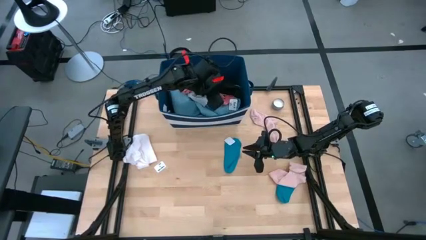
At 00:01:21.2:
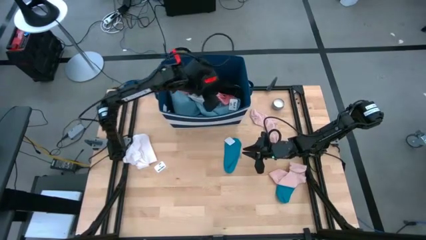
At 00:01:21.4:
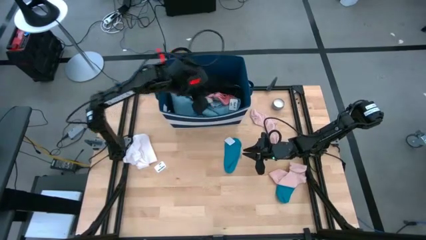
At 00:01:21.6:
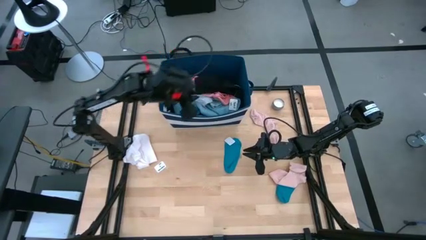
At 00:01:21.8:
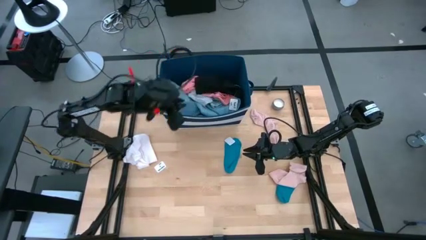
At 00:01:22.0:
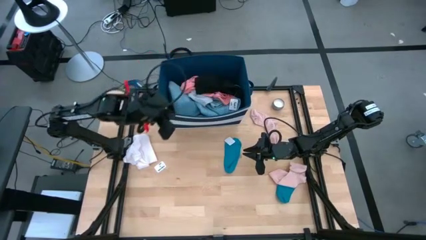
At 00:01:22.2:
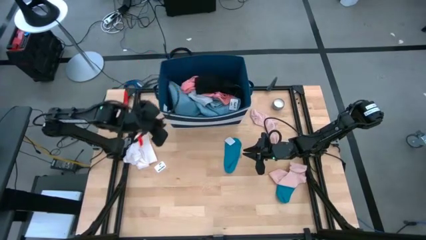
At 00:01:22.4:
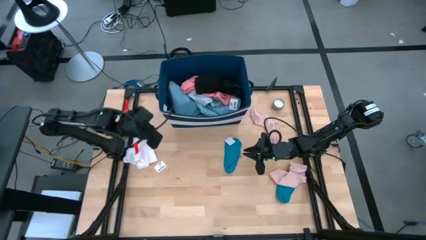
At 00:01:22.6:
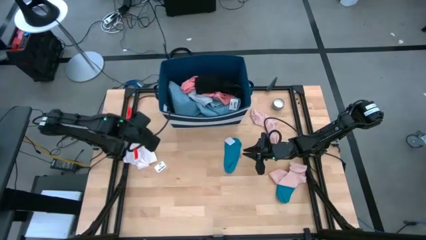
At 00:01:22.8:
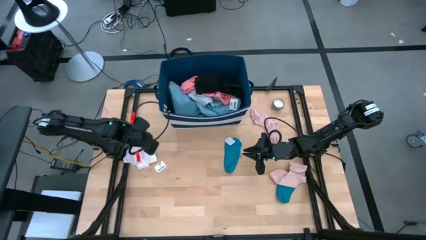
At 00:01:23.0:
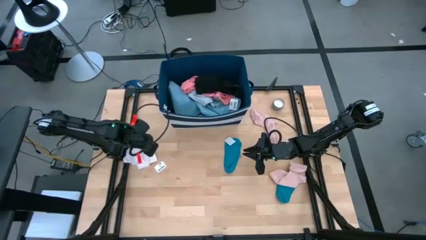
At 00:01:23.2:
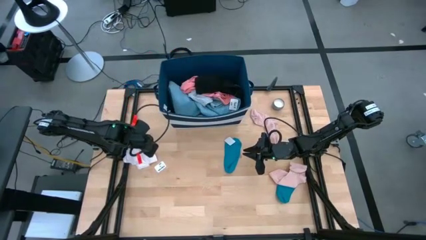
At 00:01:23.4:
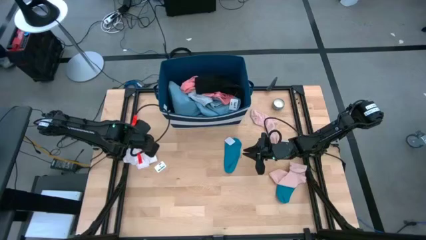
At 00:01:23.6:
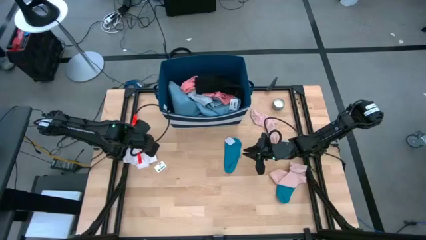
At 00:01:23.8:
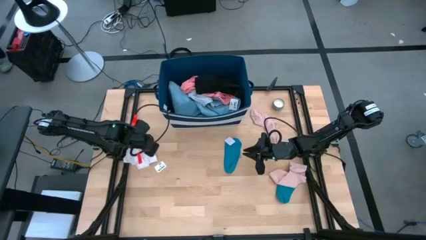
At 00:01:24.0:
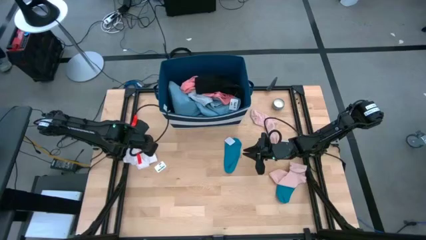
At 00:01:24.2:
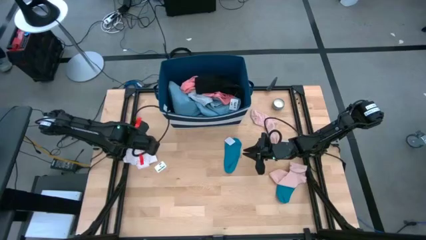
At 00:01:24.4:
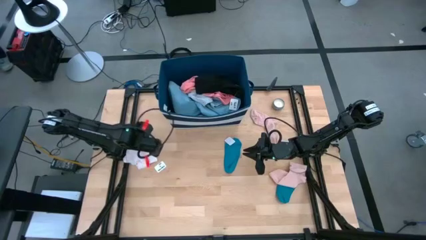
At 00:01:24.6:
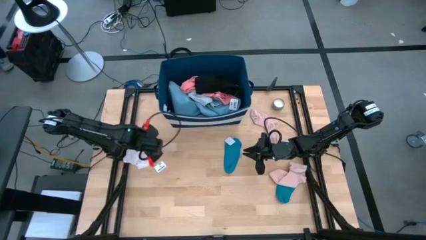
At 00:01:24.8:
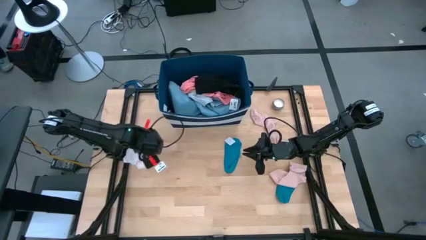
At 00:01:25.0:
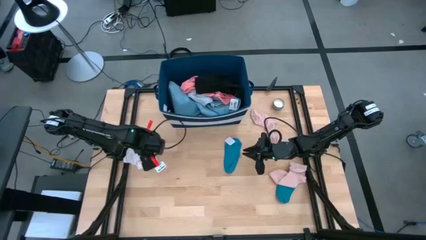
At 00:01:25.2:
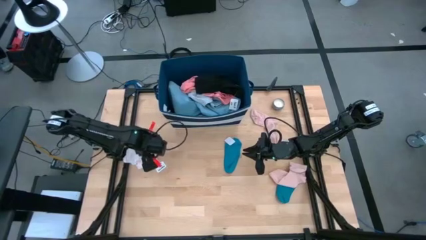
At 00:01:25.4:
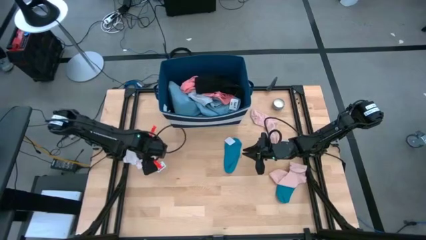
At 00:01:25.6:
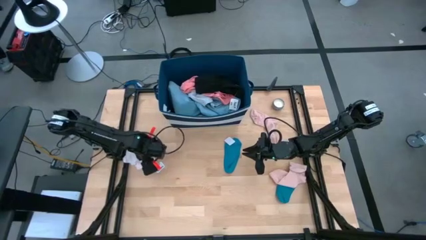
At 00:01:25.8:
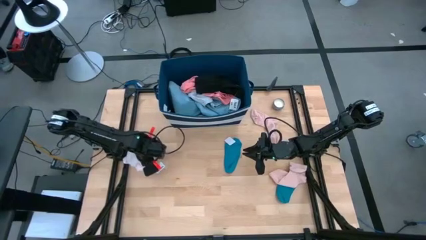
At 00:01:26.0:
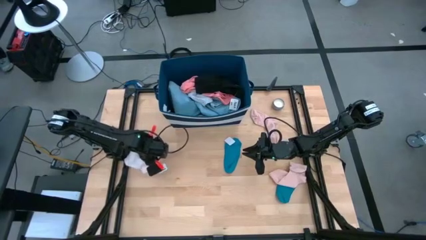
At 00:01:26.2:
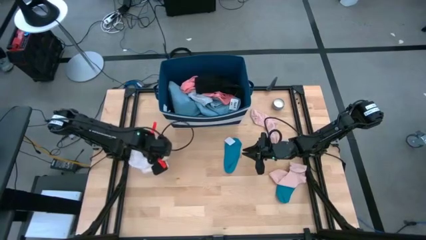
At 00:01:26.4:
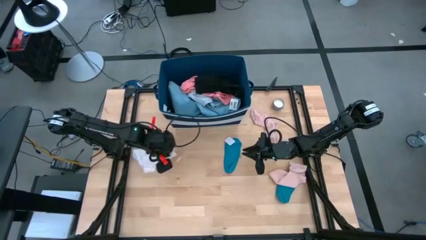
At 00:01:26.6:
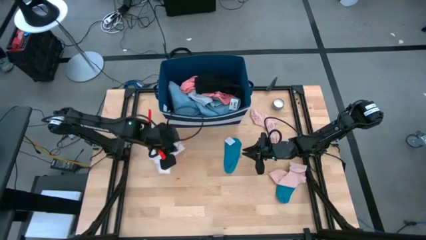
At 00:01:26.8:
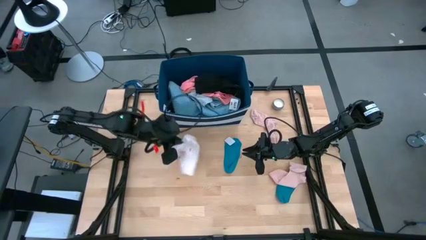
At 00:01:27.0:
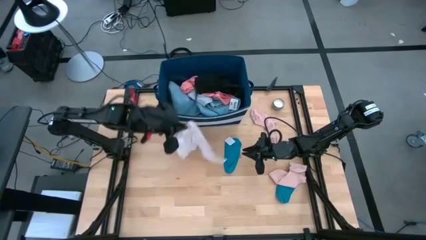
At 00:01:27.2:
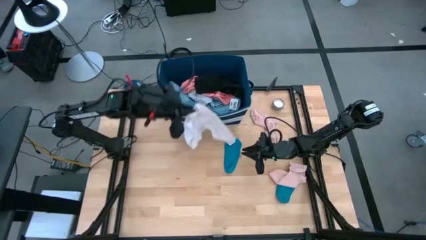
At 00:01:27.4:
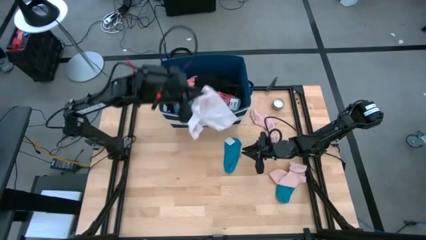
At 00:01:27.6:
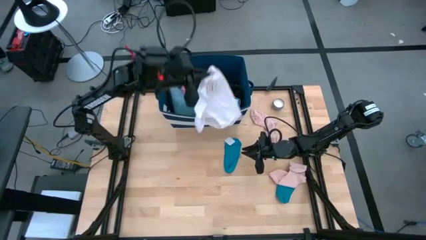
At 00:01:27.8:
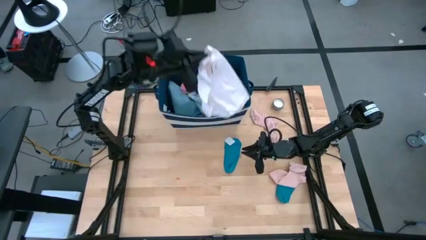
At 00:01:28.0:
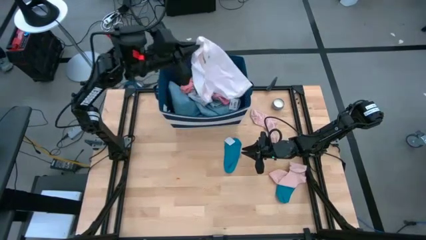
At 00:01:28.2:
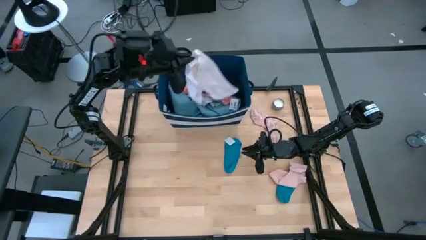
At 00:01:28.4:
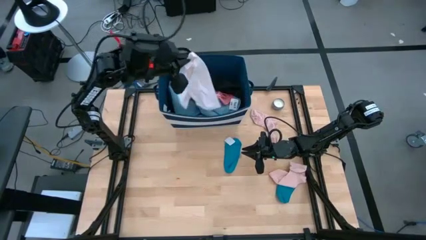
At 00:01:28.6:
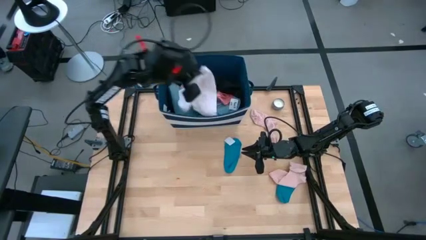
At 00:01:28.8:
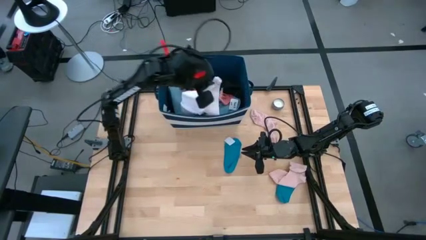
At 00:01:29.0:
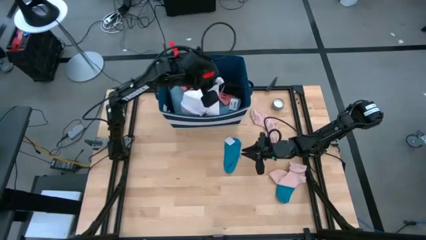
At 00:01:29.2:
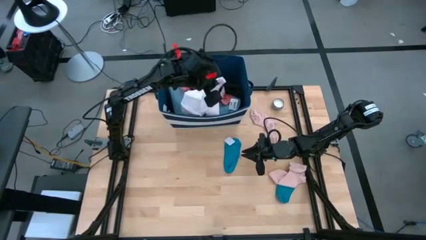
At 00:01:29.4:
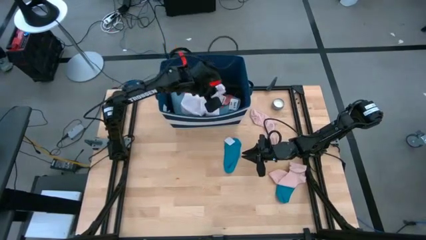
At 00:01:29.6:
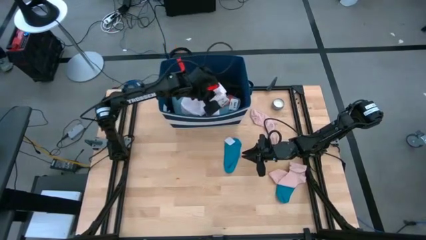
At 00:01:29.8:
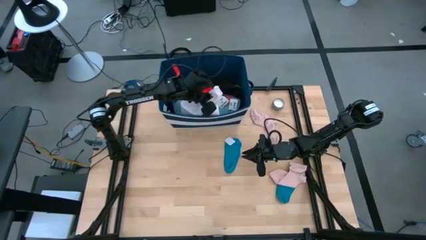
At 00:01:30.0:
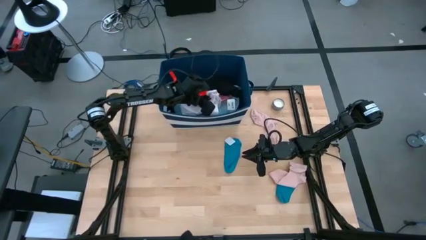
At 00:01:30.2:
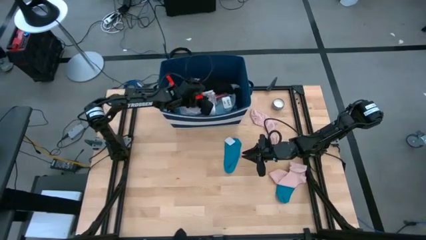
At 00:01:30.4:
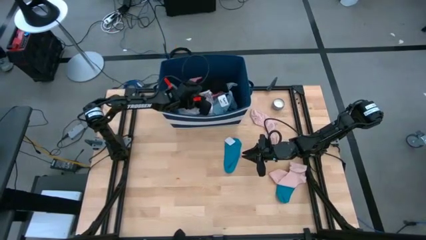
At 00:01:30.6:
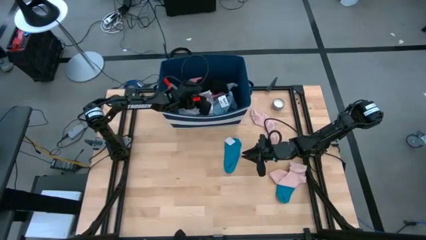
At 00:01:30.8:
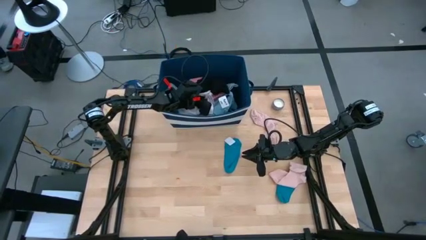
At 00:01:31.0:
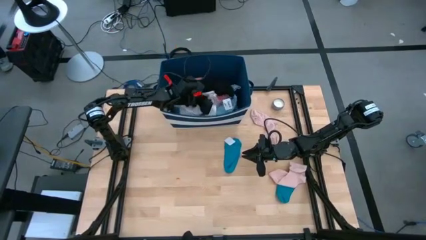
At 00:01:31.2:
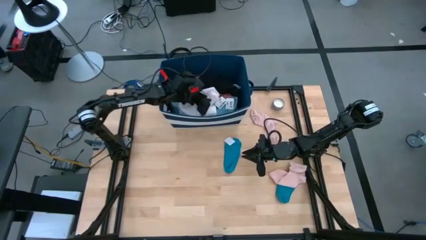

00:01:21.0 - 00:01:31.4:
Task: Sort clothes
Put the white underwear into the blue bin

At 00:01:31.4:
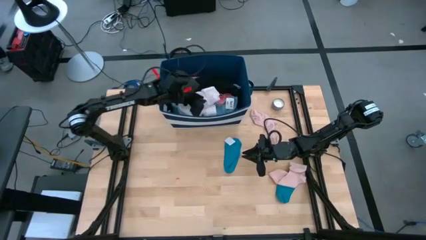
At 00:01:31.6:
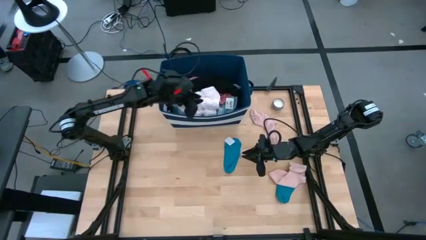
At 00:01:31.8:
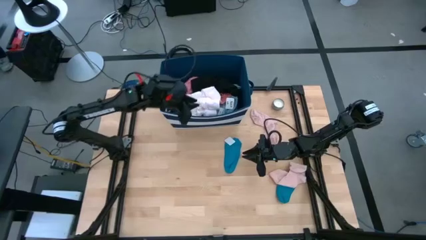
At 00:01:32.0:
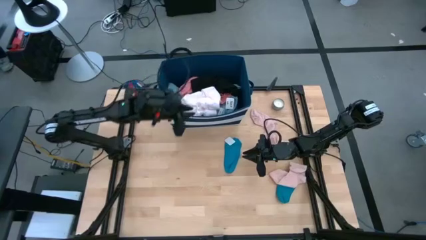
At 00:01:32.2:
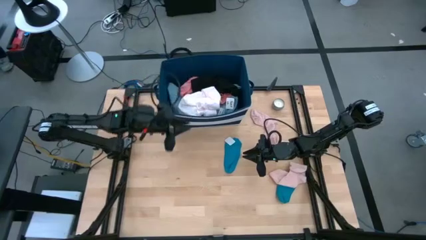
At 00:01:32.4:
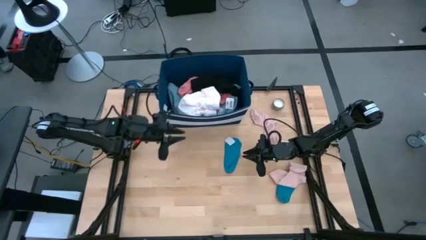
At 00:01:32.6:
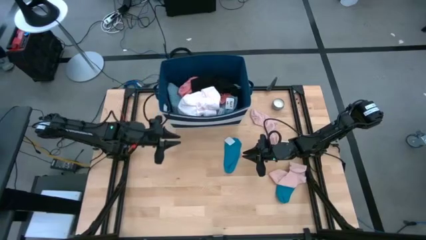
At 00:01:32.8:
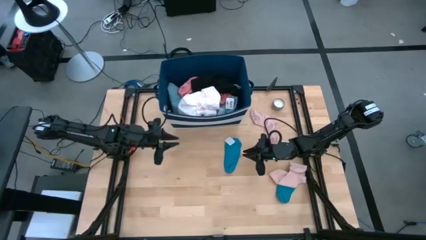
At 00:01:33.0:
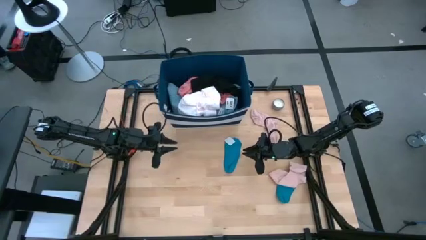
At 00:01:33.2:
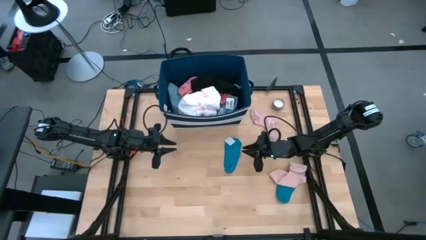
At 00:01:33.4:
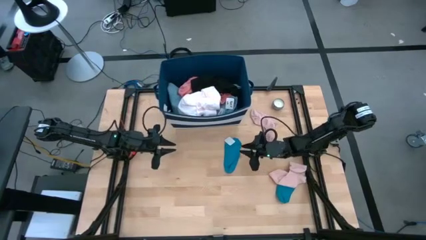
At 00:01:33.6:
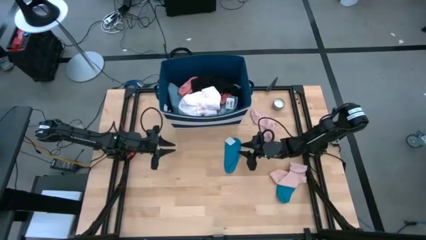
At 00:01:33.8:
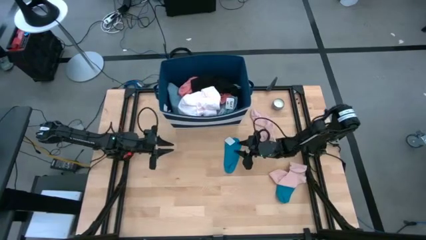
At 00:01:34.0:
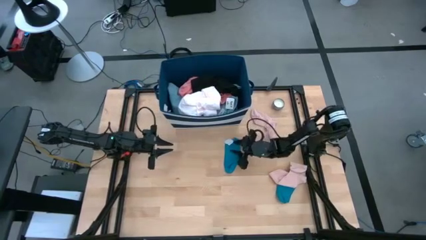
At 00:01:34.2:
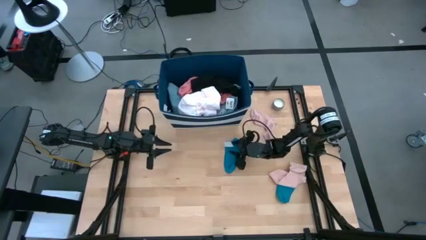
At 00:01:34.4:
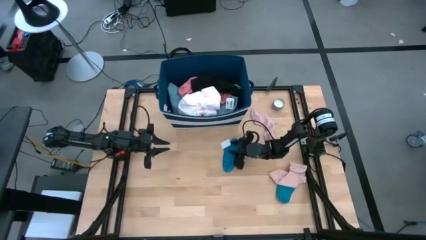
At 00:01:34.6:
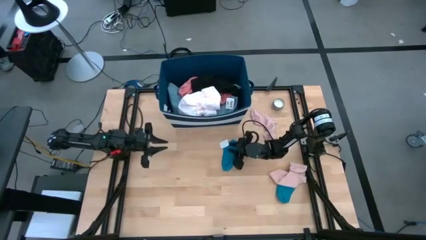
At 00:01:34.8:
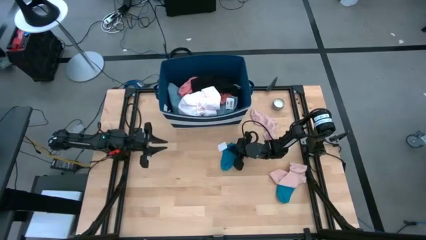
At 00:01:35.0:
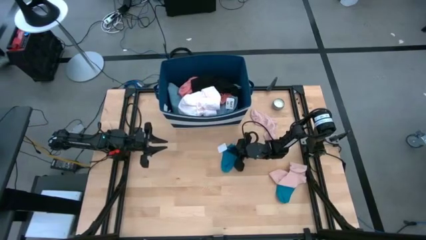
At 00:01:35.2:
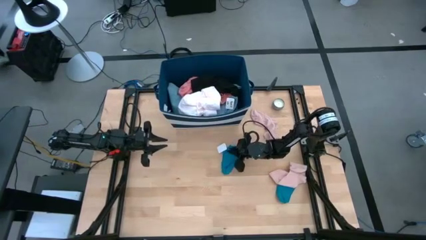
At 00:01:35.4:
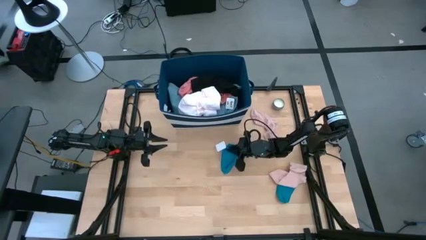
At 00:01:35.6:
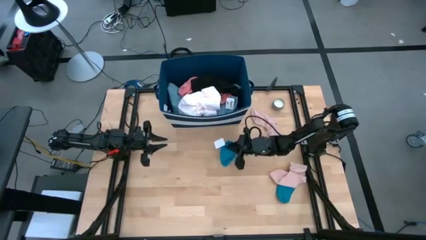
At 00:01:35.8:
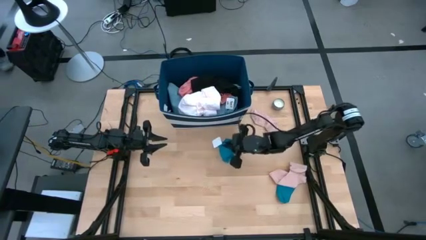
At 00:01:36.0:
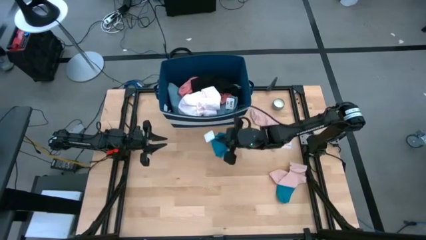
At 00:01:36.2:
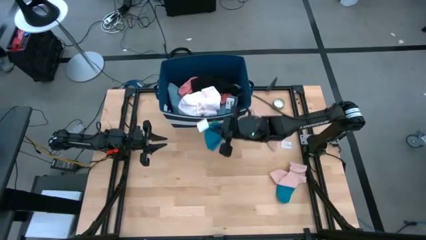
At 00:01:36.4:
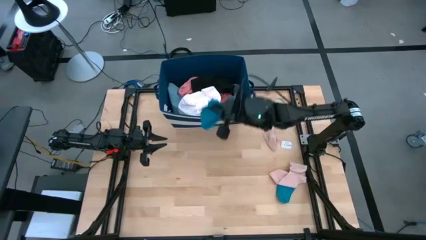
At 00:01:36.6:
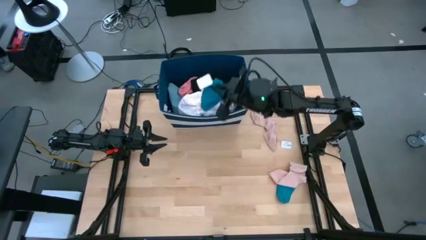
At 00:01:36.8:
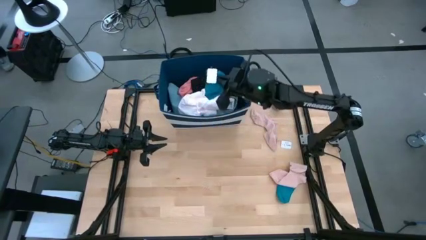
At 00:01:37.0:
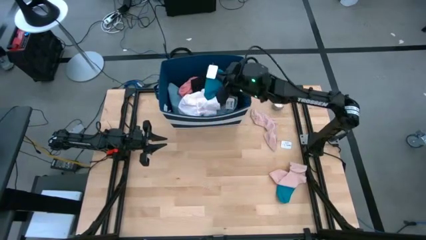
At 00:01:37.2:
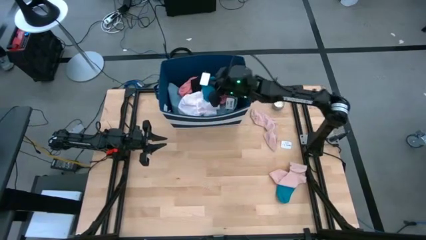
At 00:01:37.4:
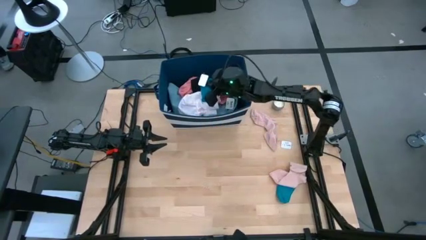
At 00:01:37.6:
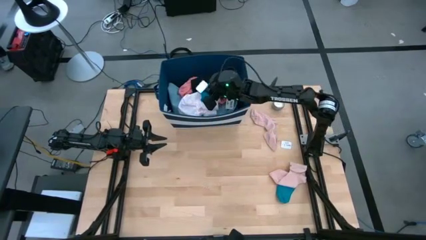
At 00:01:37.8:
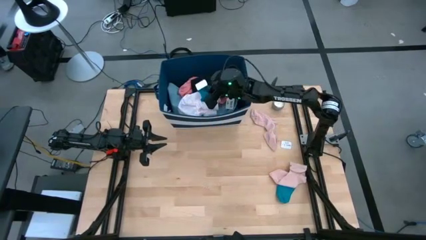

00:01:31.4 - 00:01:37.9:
Put the left blue sock into the blue bin
